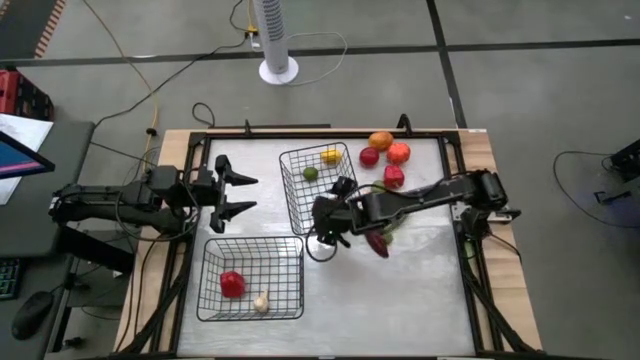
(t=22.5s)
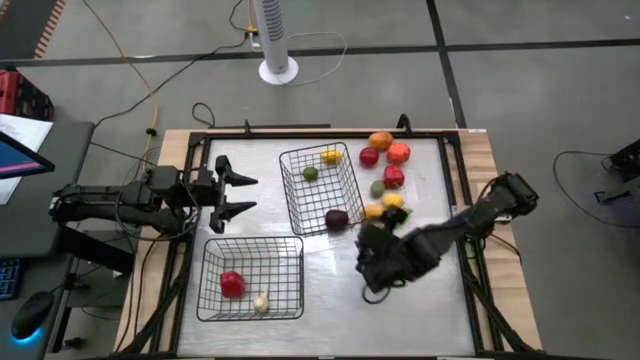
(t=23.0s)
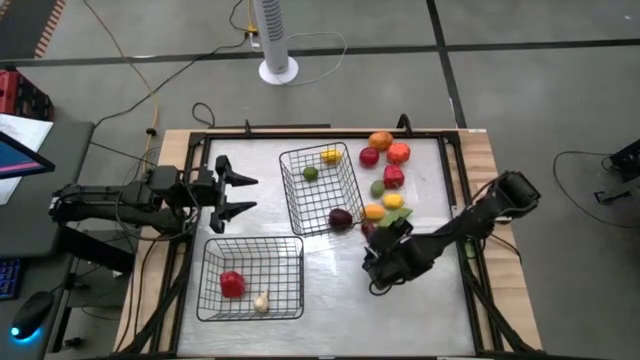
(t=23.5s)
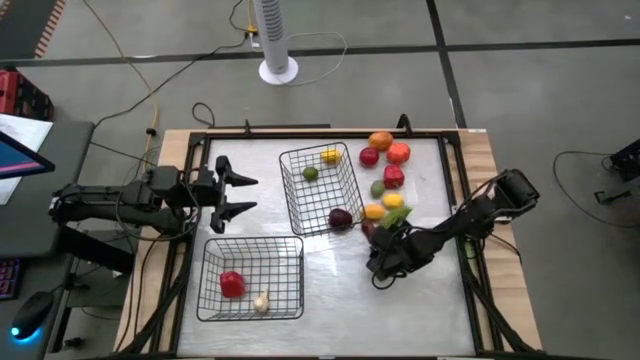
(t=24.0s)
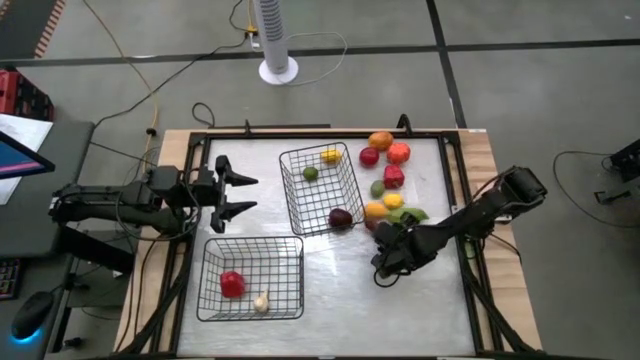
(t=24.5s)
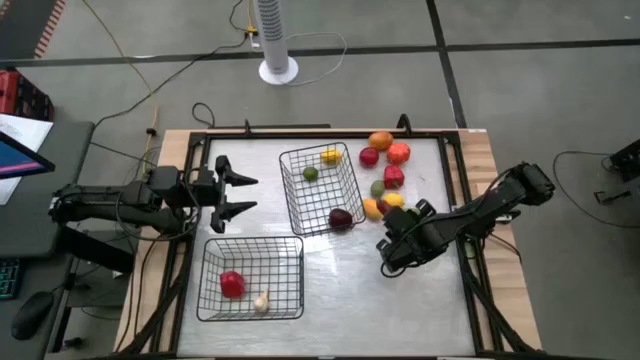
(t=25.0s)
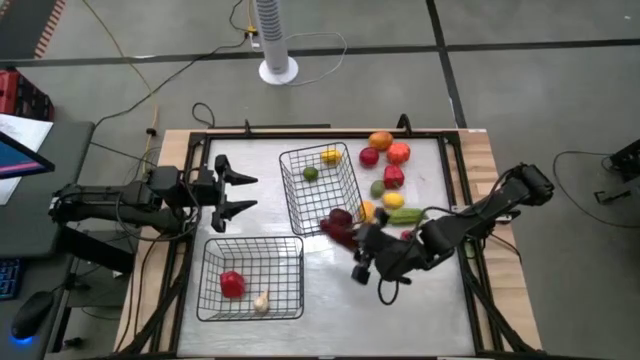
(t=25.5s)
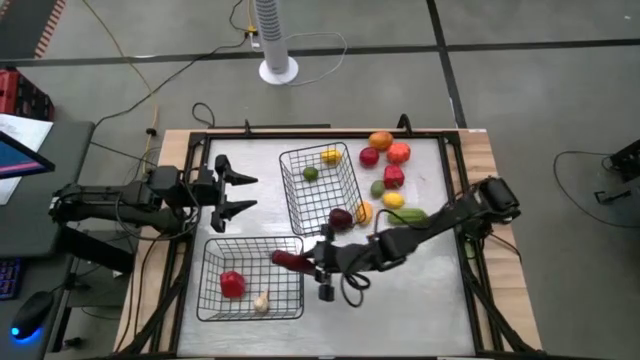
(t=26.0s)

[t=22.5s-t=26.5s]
Task: Sort produce into baskets
Put the red chili pepper into the bottom black wire basket

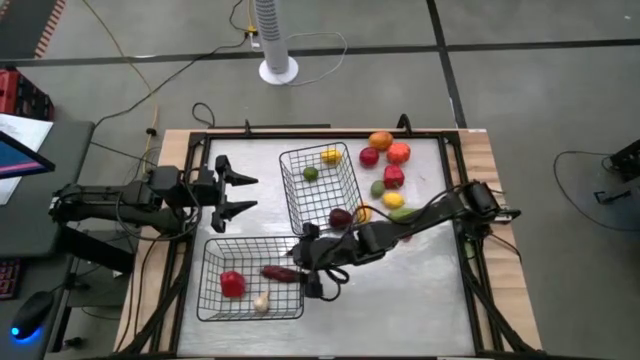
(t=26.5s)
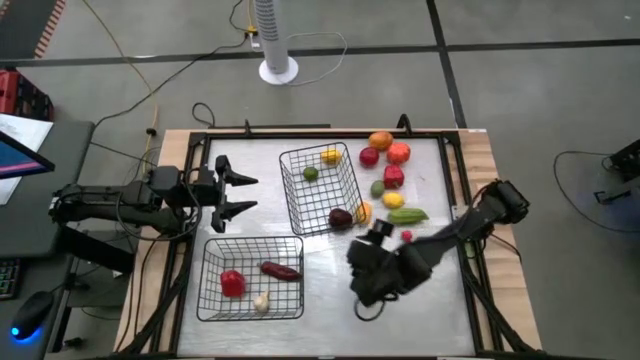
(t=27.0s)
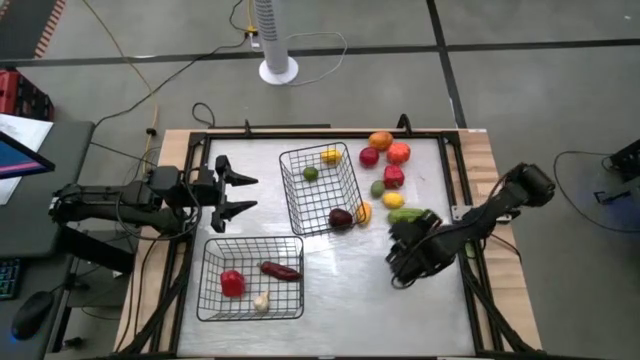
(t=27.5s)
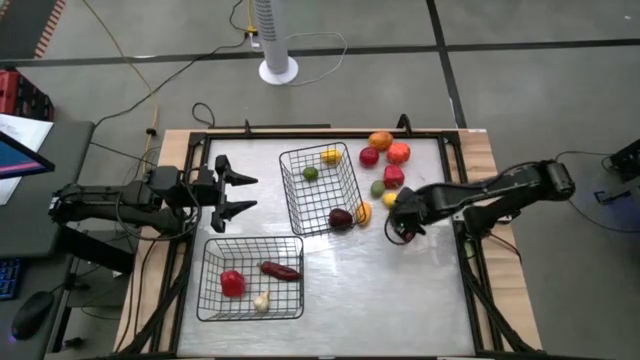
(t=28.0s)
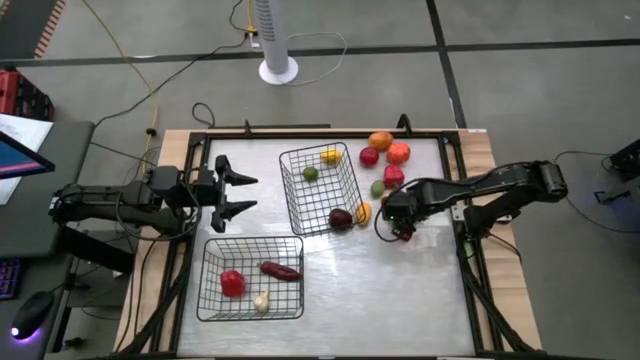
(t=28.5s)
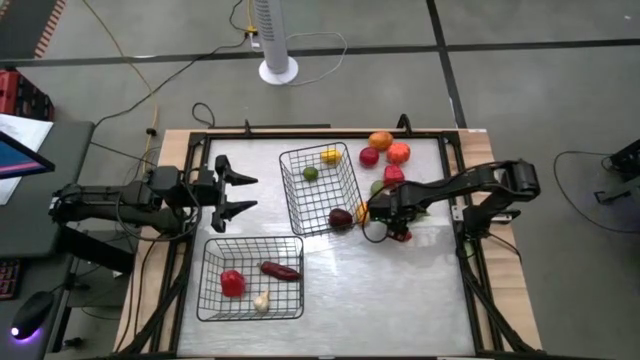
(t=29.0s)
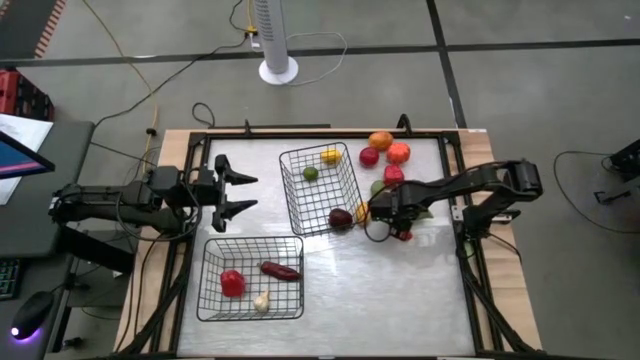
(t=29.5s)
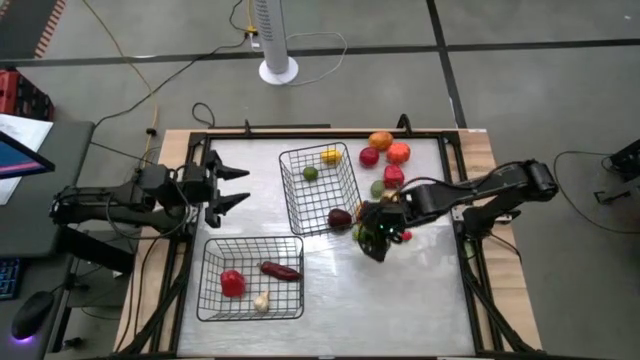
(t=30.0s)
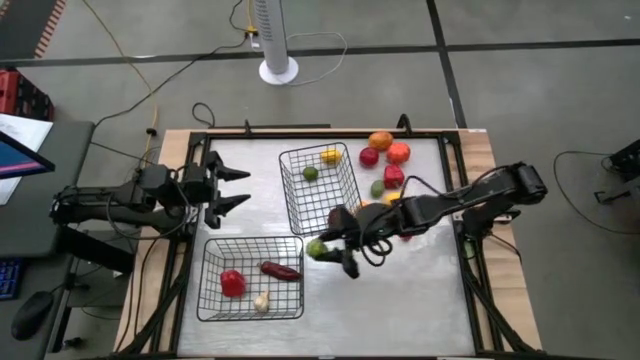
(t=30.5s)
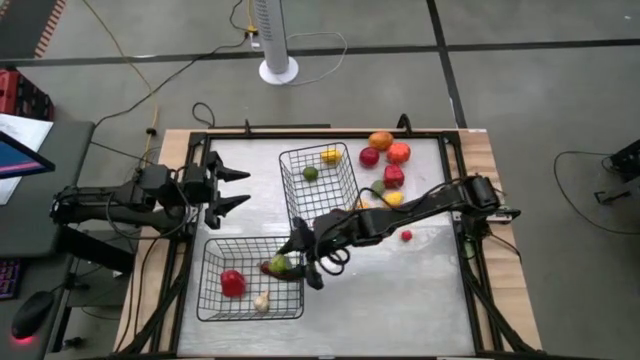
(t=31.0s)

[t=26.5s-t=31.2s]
Put the green cucumber into the bottom black wire basket

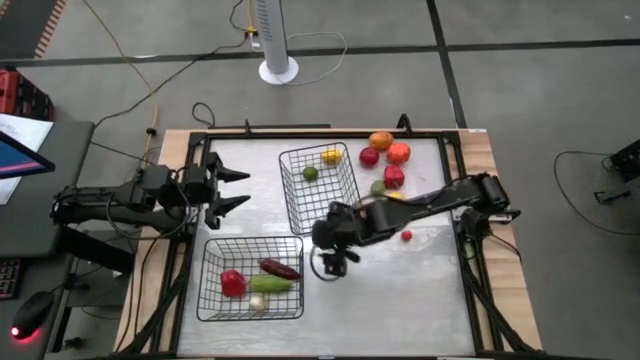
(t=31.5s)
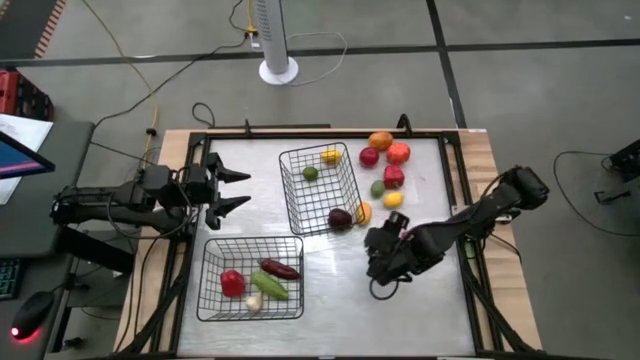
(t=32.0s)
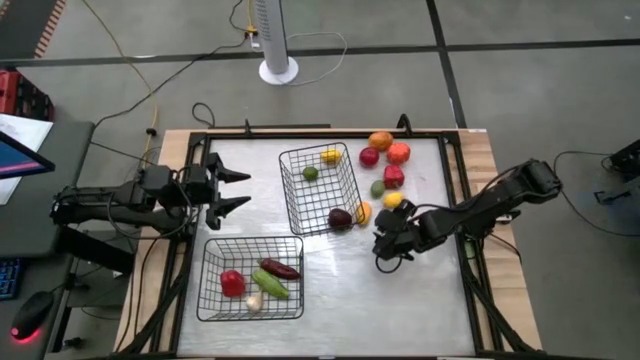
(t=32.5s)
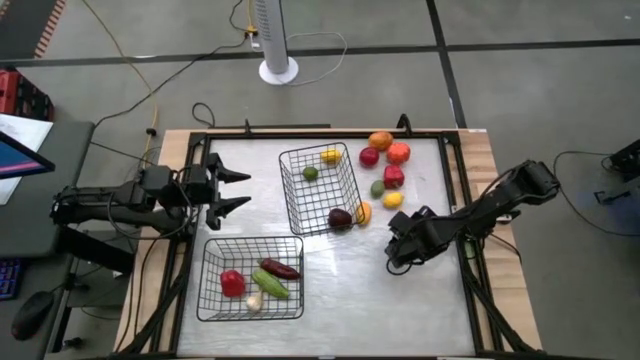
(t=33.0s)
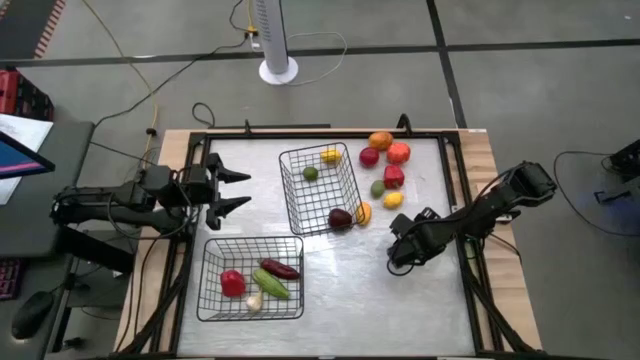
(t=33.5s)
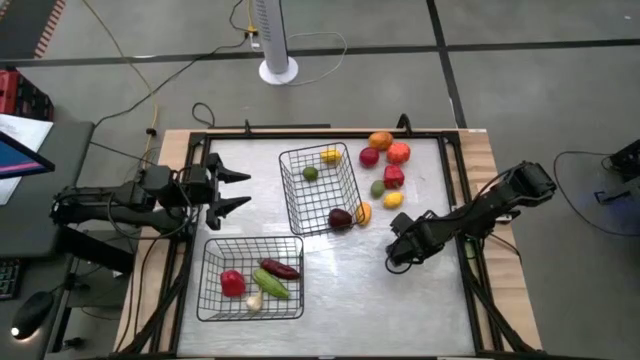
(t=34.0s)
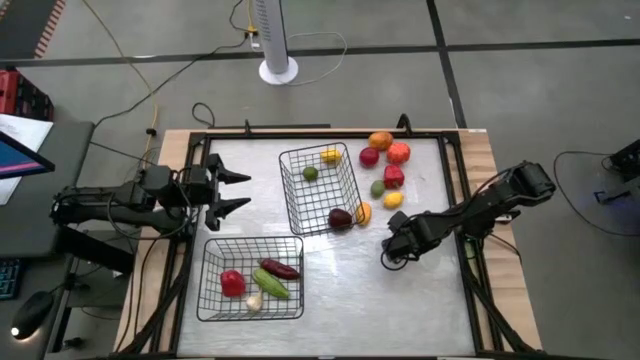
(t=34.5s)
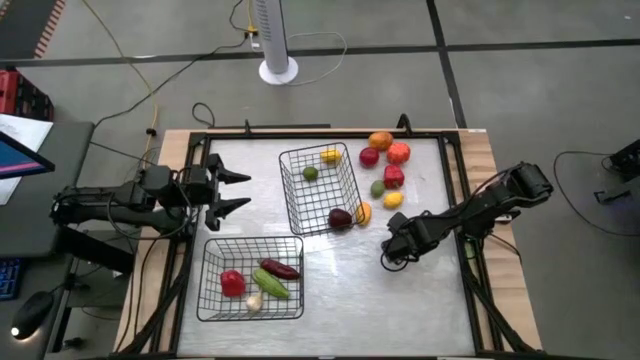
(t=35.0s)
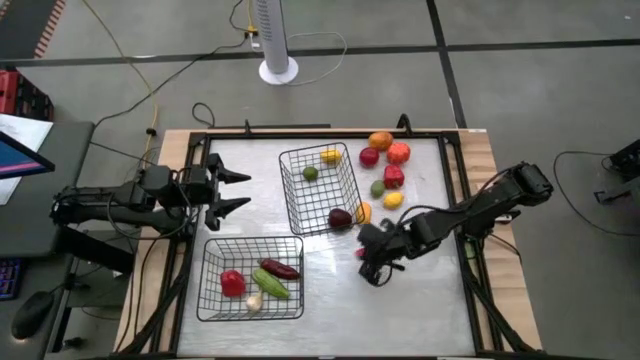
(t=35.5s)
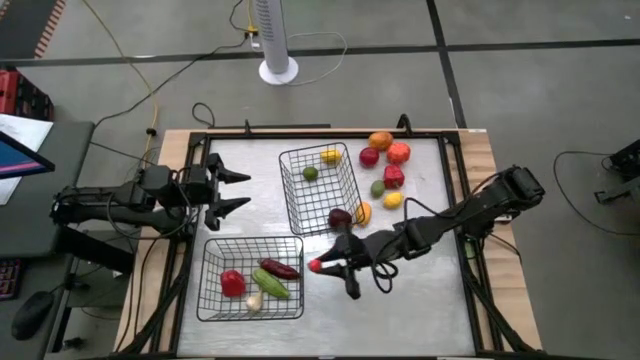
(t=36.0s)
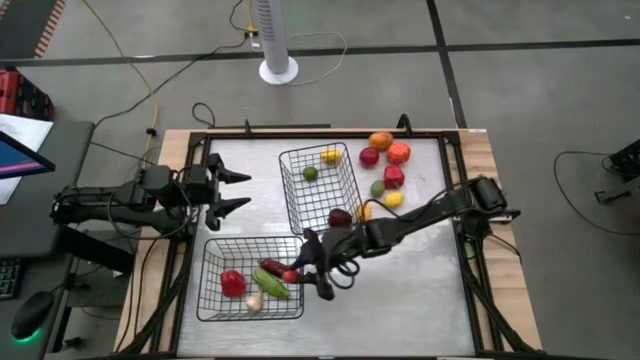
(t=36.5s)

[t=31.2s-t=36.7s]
Put the bottom red tomato into the top black wire basket

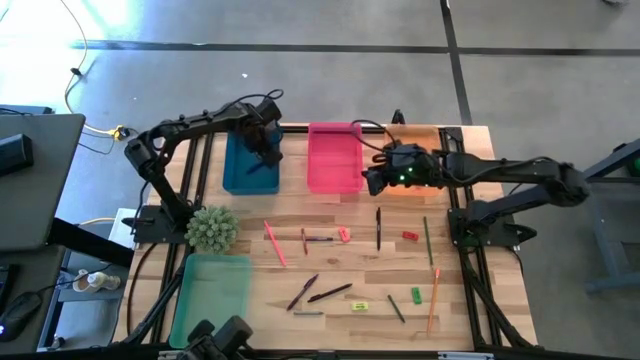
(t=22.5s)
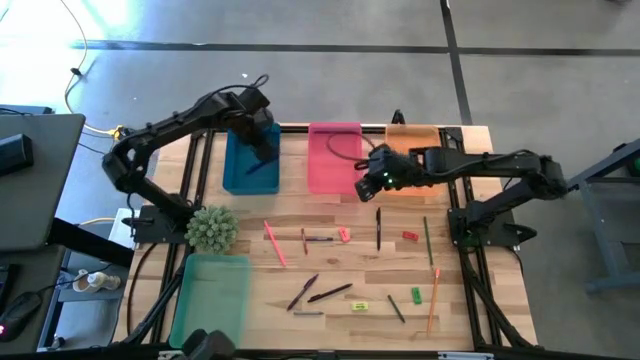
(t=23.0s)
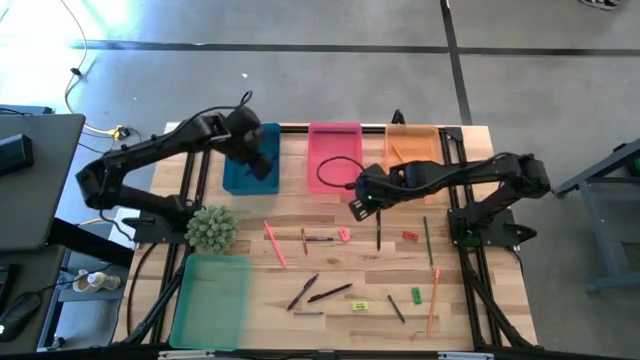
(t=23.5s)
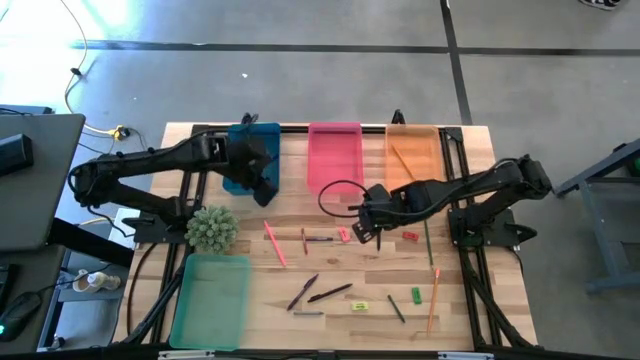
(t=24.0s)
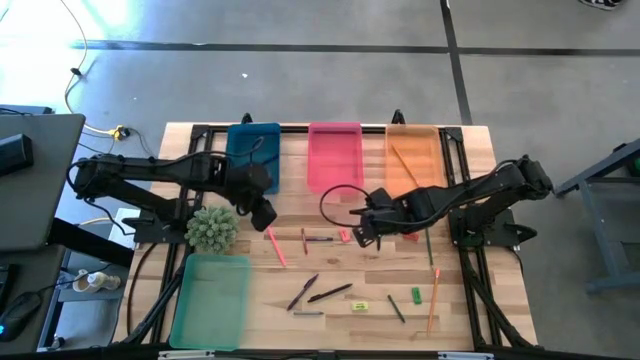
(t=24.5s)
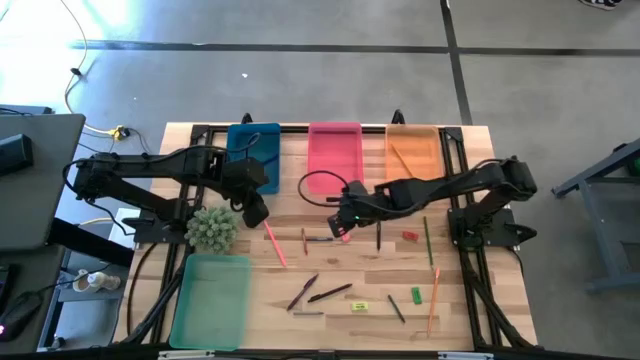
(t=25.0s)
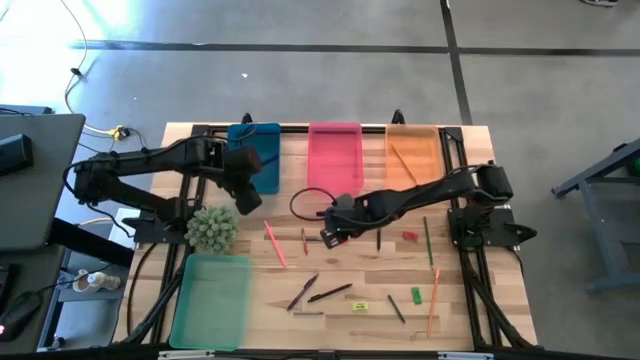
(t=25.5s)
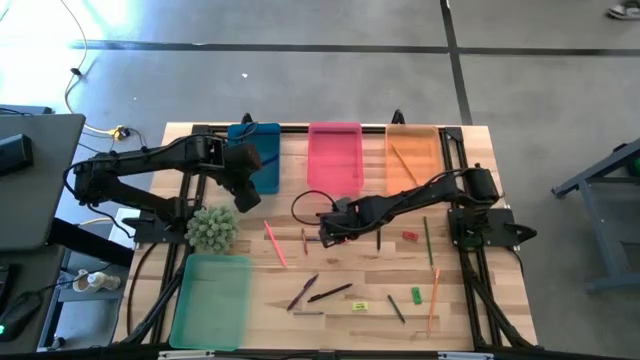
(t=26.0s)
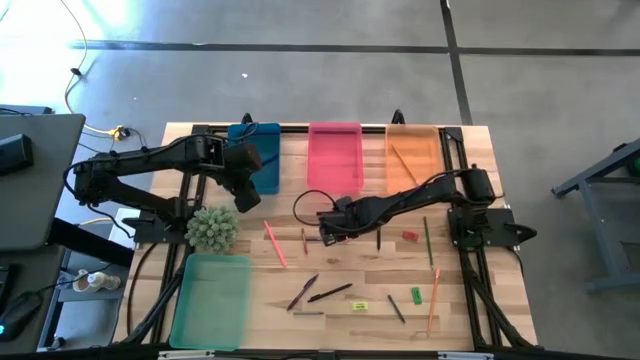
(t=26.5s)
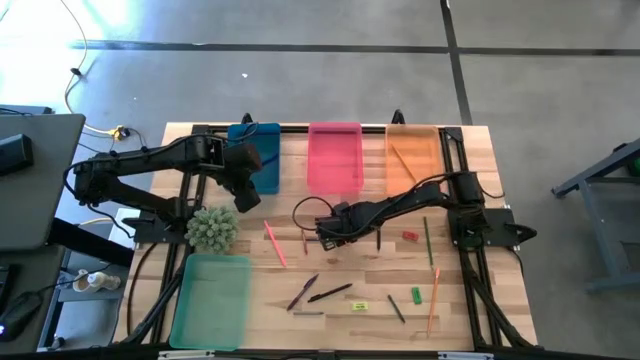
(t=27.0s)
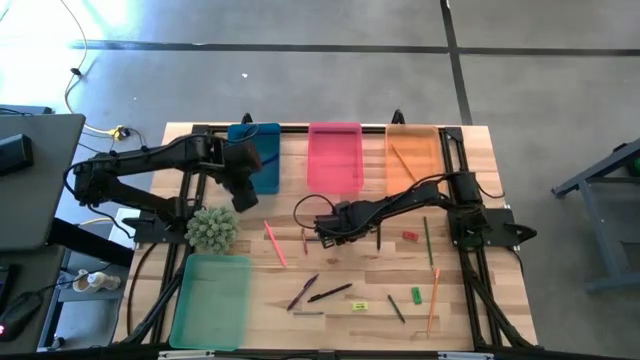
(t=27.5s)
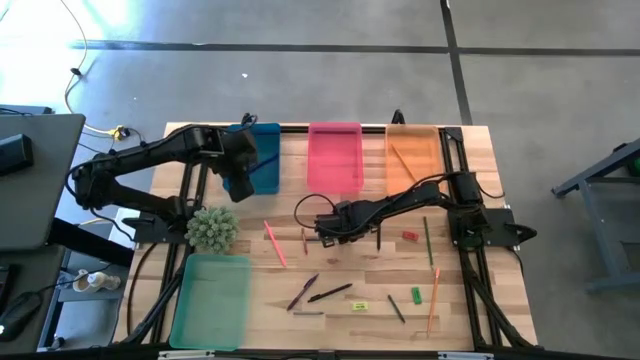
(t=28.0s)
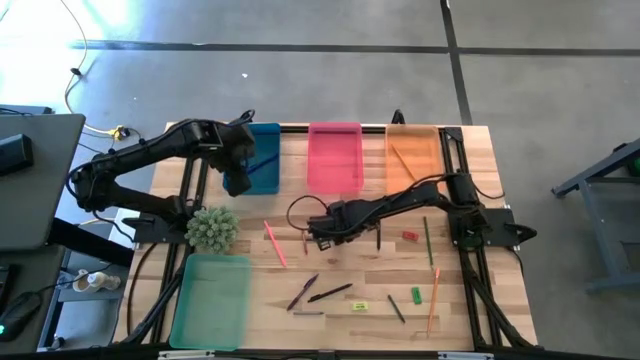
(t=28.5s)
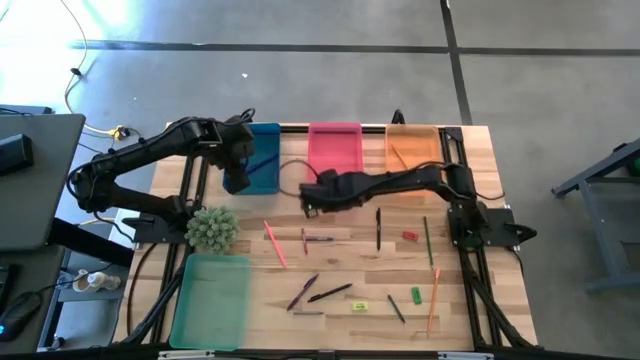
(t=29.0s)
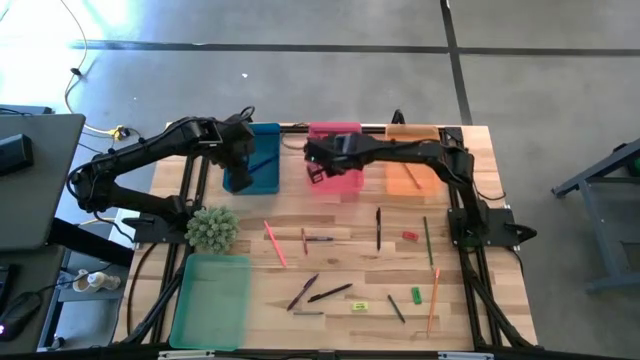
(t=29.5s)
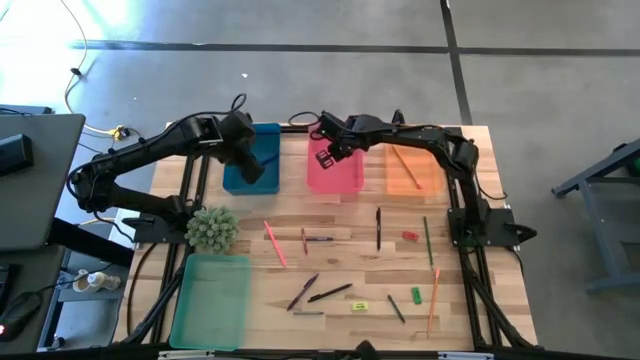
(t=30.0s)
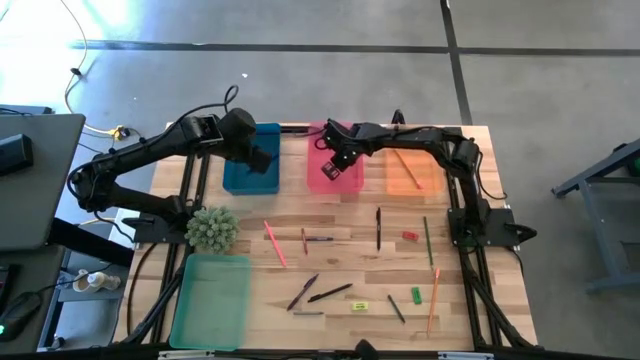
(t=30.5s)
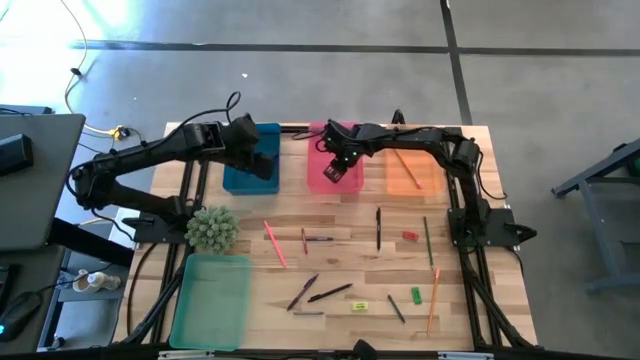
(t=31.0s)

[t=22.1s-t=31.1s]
Task: Sort crayons/erasers/pens/pencils in bins
Put the pink eraser into the pink bin
